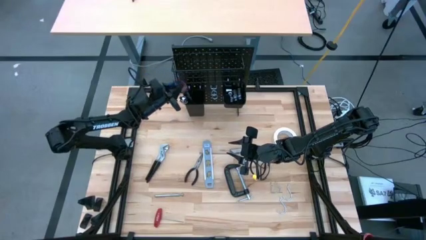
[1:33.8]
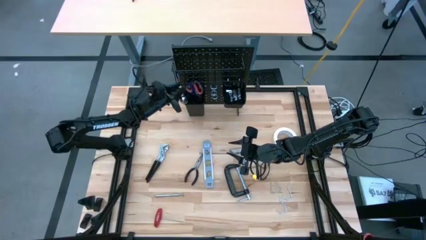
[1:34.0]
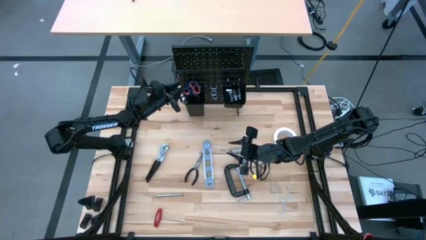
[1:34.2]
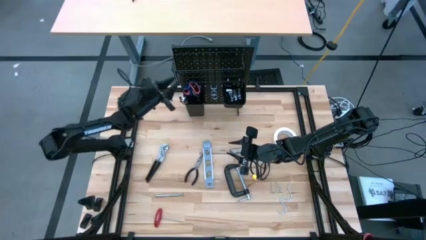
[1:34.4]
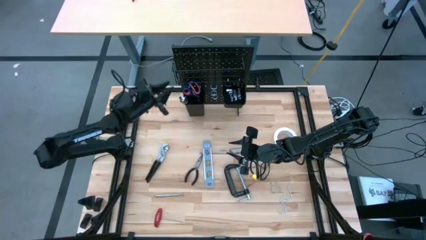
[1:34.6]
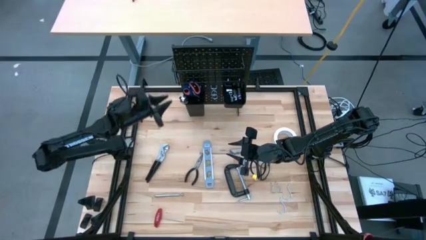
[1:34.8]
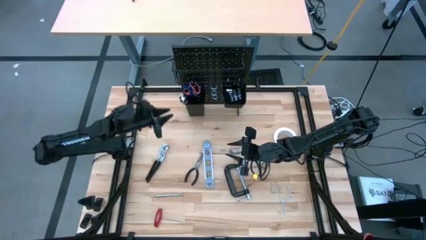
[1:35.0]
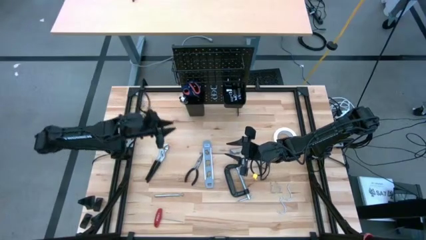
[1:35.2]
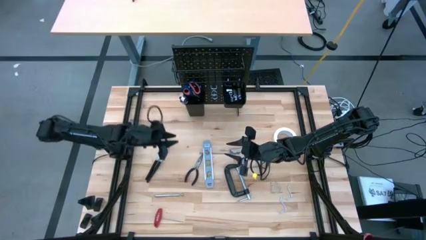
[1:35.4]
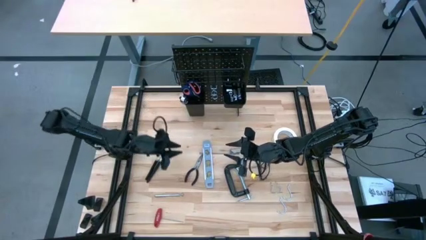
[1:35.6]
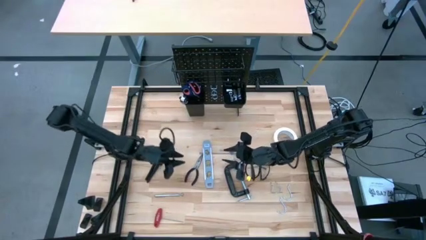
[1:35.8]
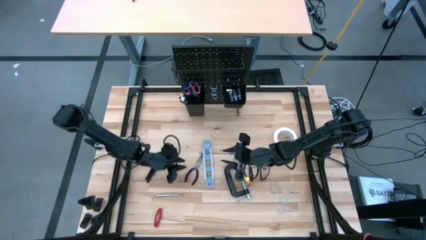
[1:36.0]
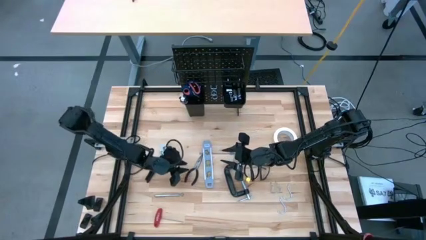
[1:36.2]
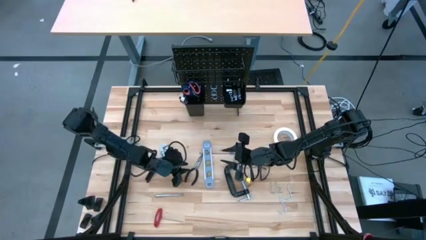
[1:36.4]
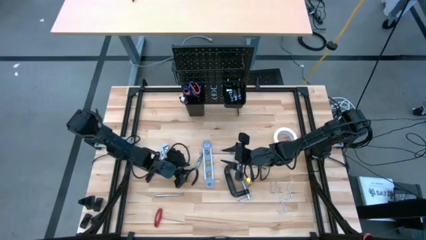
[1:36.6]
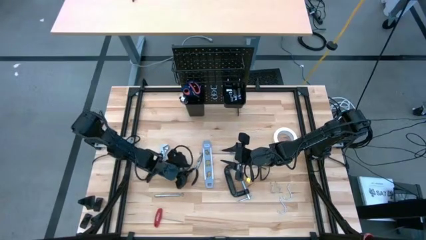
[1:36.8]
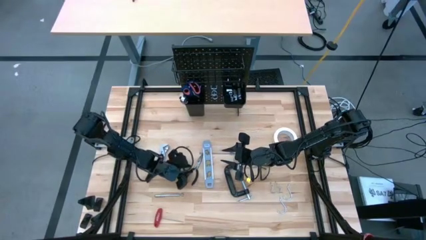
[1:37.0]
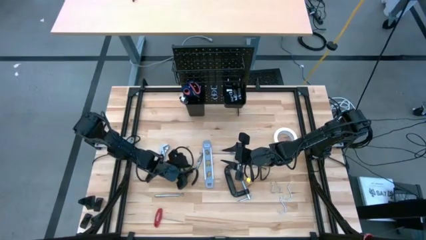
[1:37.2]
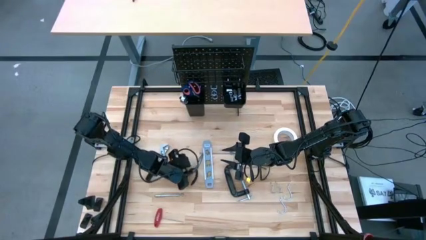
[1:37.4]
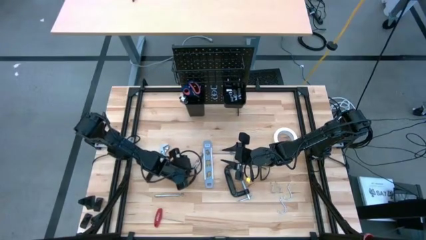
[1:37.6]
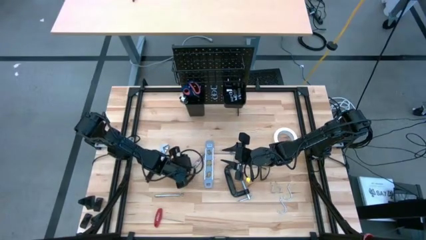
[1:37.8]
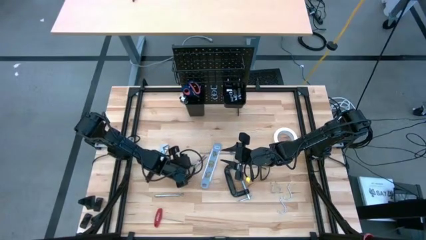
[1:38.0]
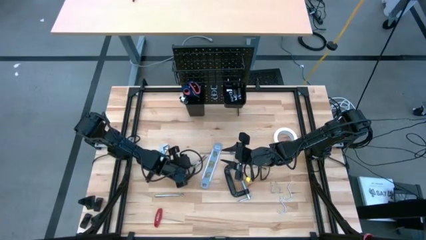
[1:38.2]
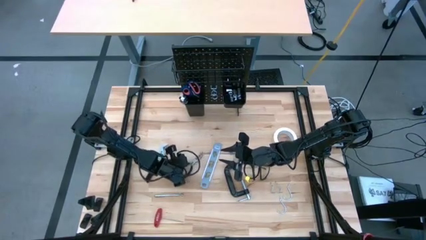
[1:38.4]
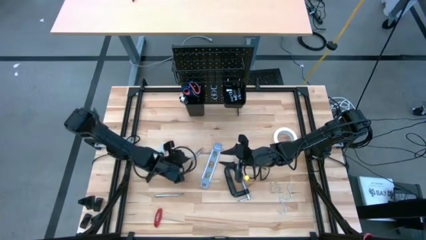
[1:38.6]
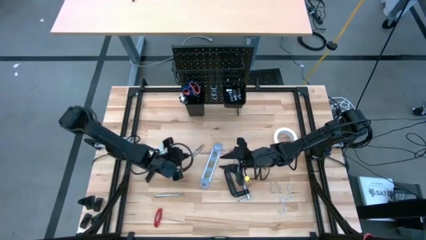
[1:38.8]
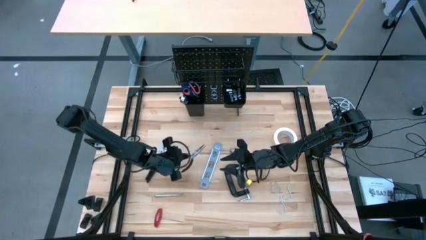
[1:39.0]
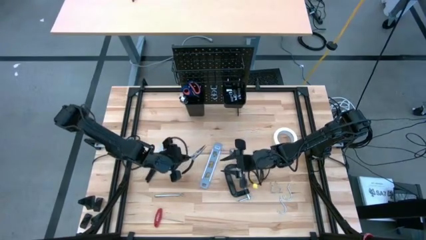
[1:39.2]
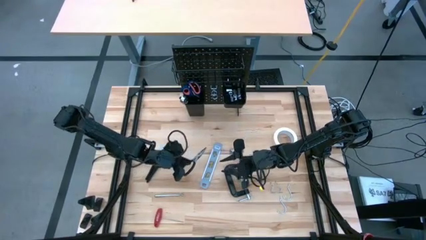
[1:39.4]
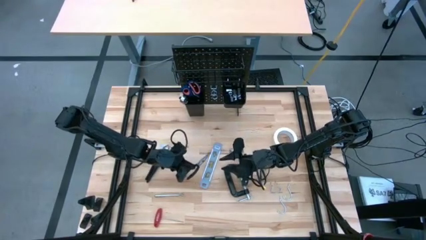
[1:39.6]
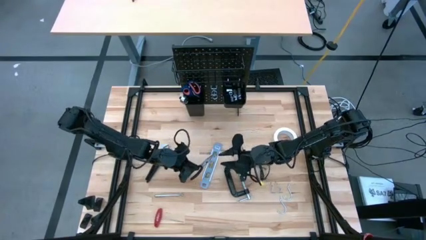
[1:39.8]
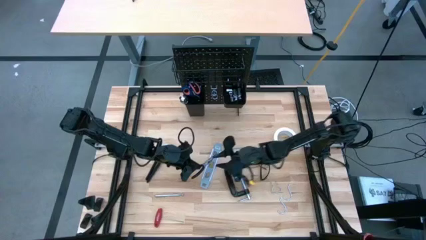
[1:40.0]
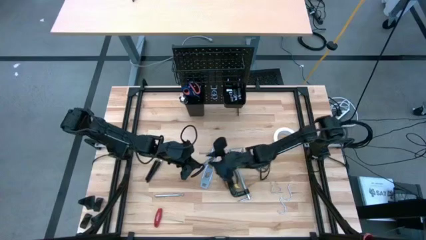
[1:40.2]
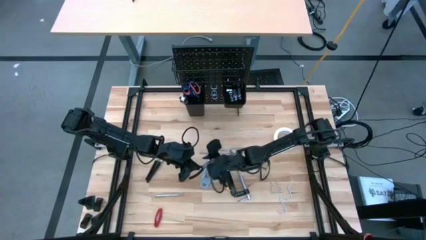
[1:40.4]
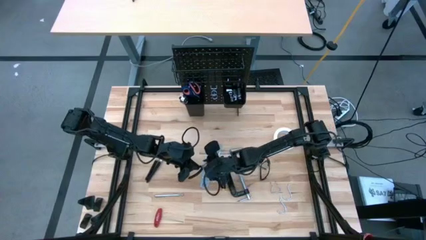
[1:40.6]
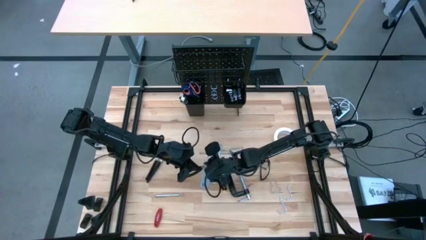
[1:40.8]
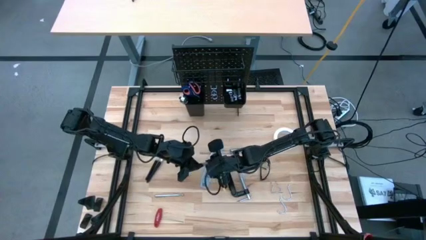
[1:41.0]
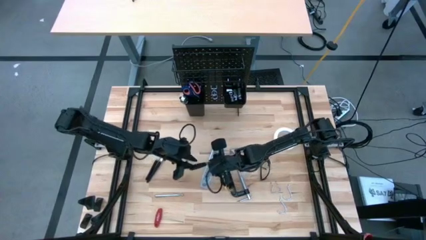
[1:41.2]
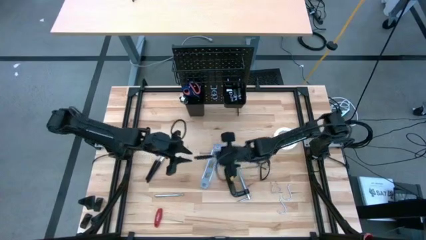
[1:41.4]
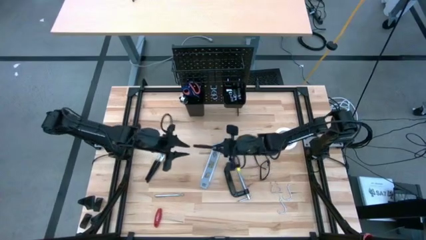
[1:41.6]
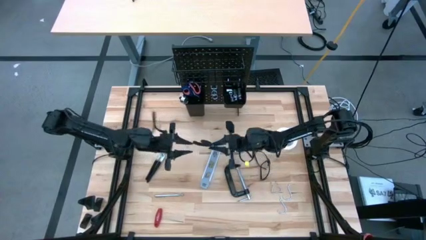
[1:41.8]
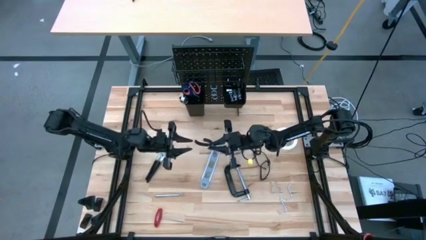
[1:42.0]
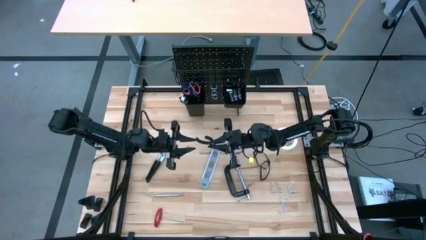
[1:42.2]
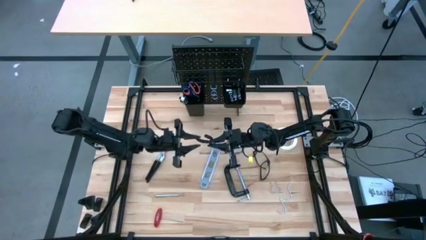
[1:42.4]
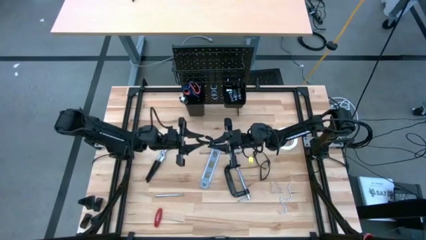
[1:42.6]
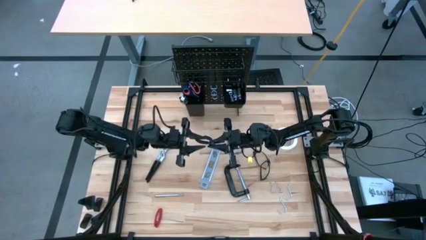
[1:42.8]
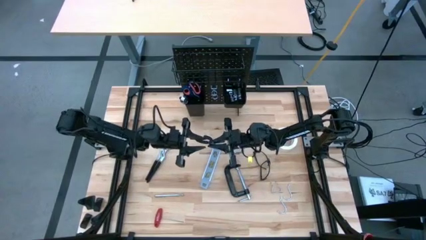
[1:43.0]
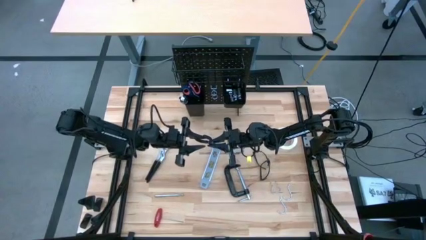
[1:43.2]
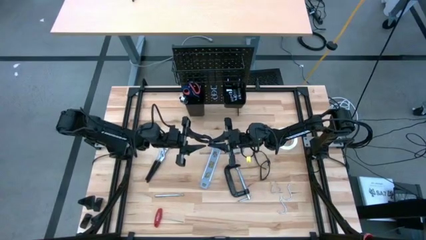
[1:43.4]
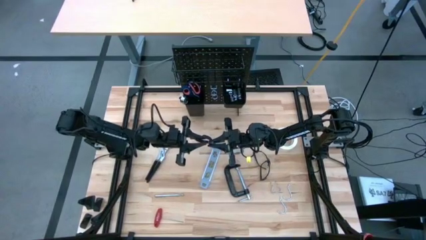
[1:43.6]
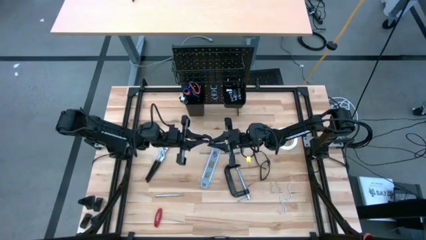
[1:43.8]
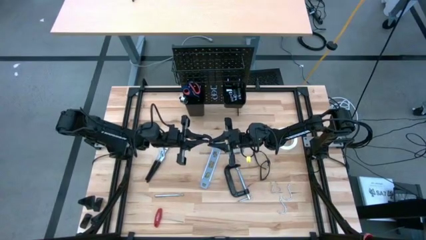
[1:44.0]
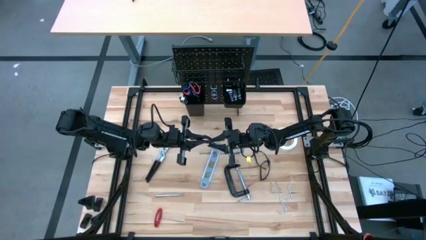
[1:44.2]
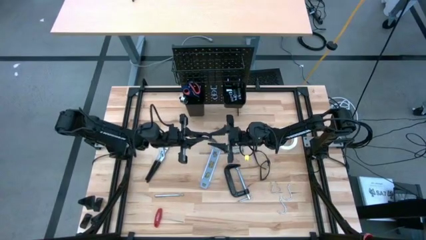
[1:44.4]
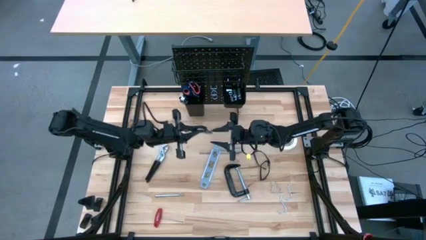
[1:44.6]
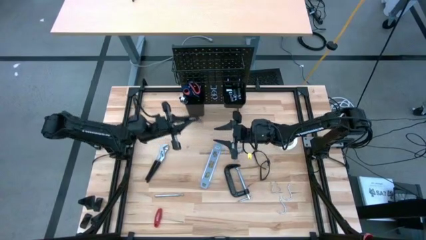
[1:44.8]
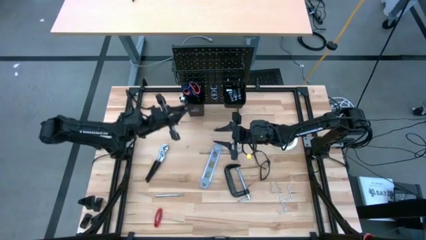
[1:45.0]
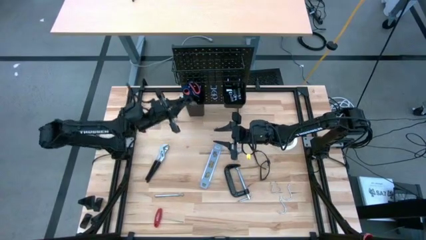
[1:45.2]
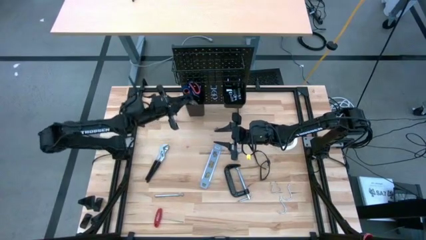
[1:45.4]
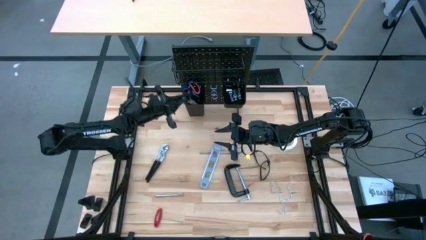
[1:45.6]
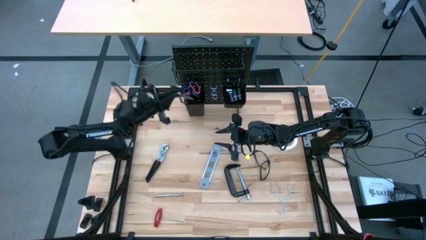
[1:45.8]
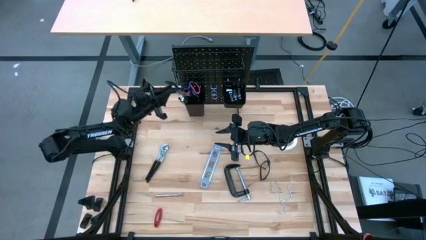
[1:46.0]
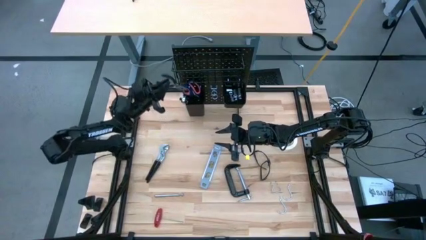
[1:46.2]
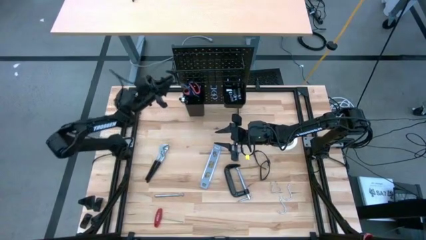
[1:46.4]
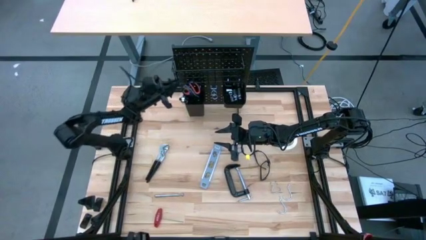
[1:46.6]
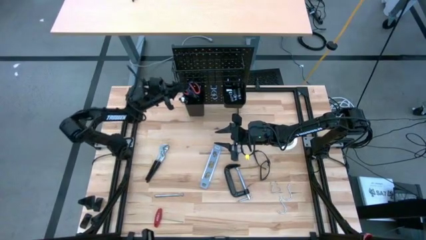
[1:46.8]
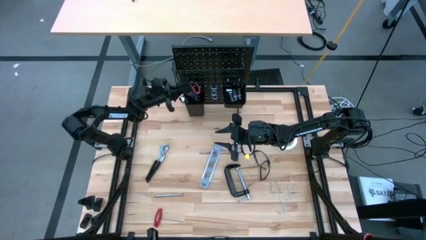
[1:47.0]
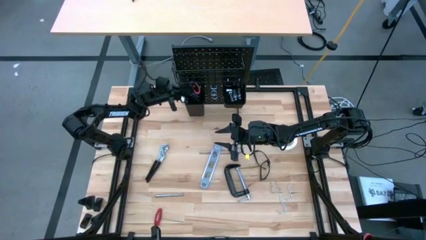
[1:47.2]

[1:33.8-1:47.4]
Task: Hang tools onto peg board
Put the black long nose pliers into the left black bin on the peg board
